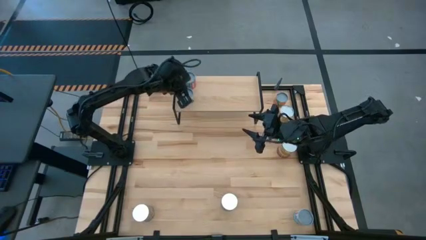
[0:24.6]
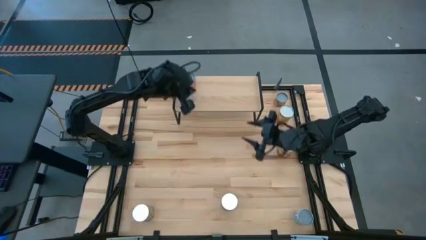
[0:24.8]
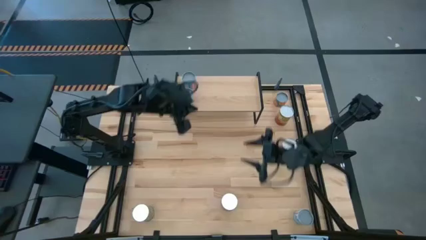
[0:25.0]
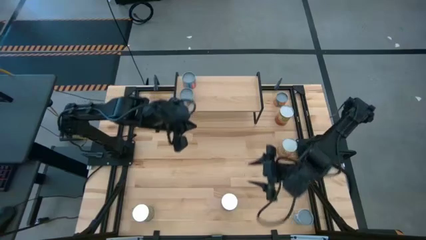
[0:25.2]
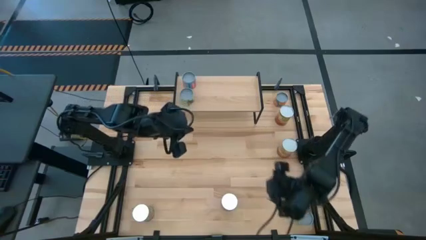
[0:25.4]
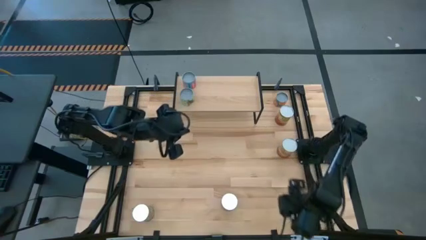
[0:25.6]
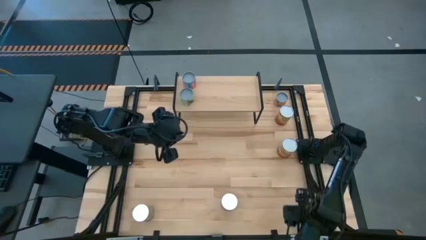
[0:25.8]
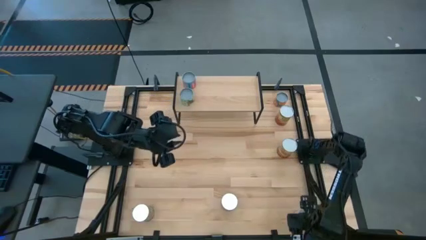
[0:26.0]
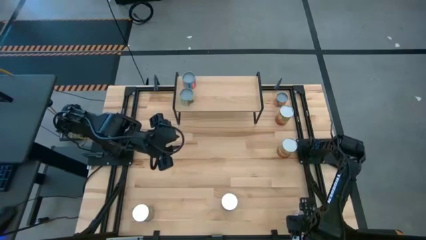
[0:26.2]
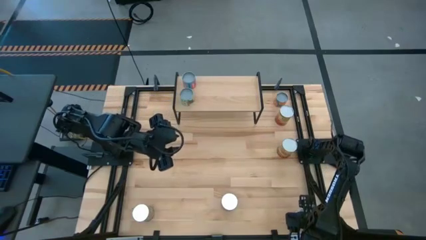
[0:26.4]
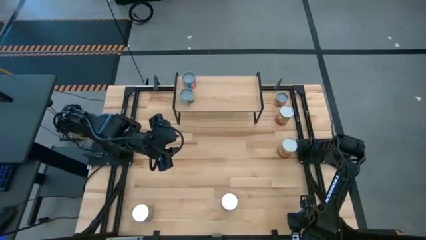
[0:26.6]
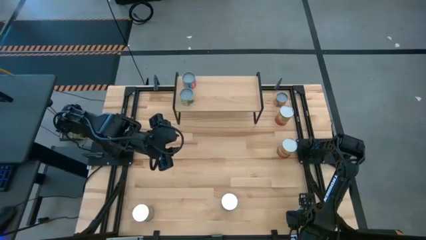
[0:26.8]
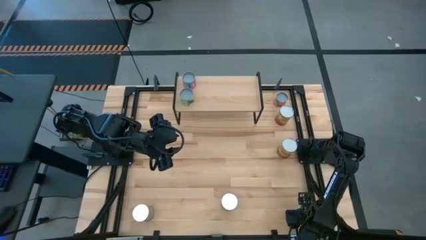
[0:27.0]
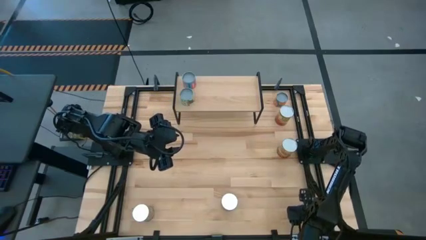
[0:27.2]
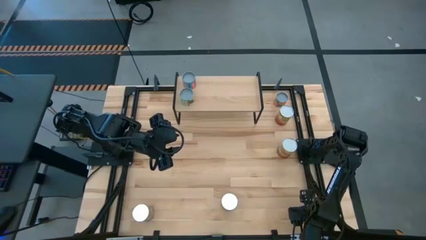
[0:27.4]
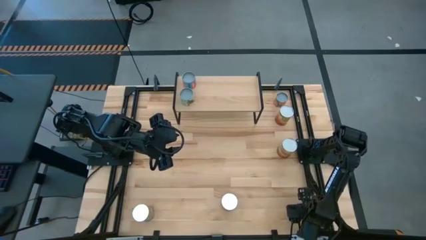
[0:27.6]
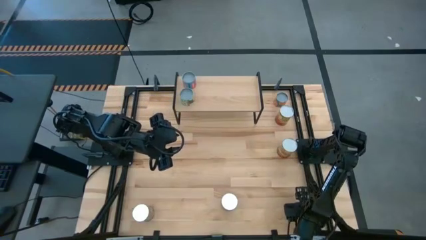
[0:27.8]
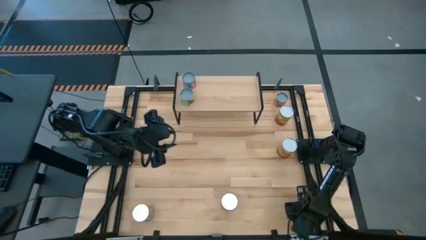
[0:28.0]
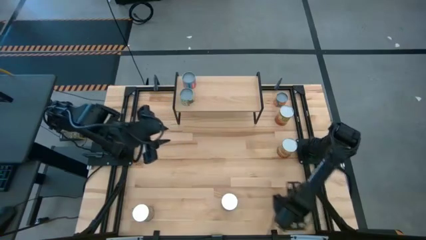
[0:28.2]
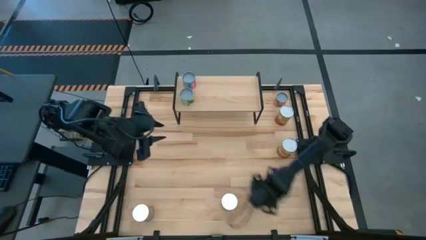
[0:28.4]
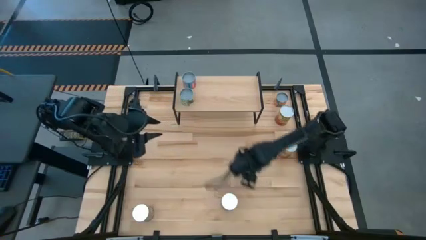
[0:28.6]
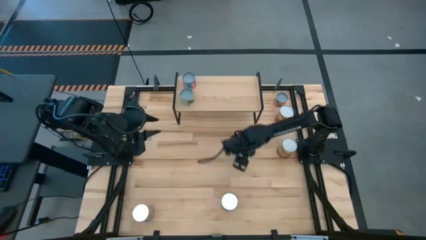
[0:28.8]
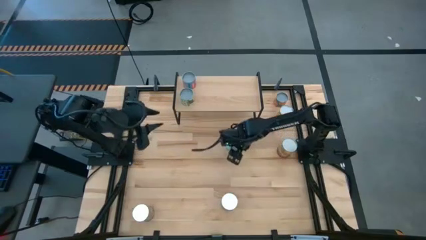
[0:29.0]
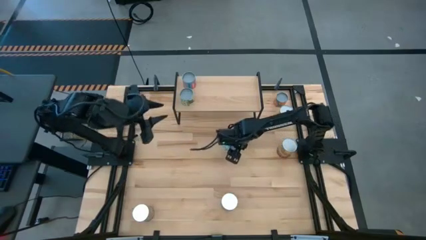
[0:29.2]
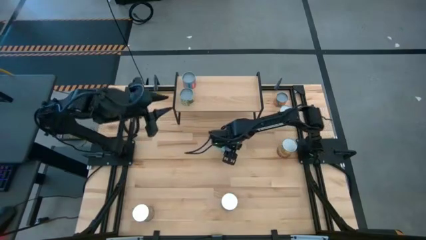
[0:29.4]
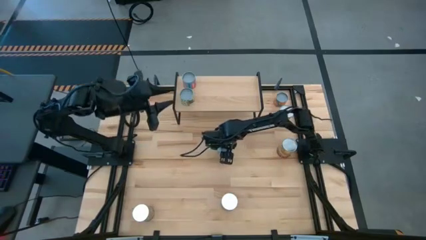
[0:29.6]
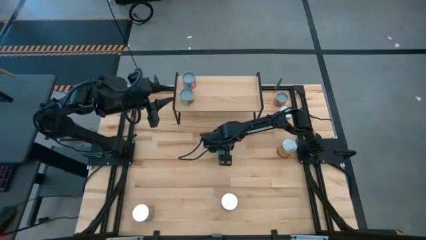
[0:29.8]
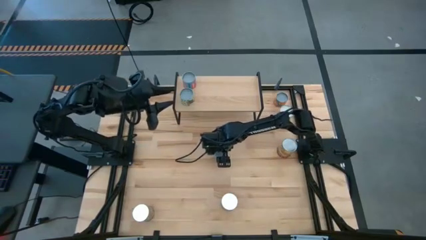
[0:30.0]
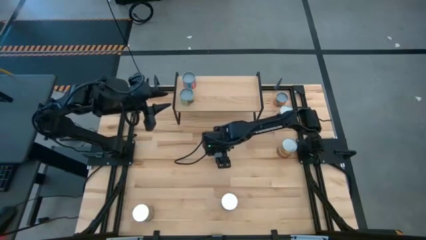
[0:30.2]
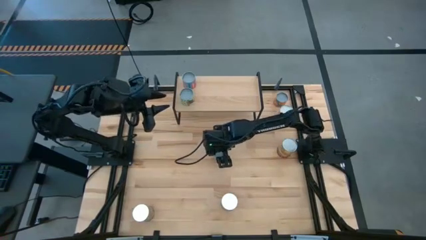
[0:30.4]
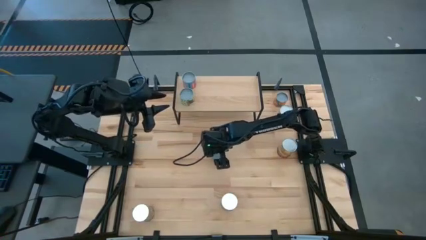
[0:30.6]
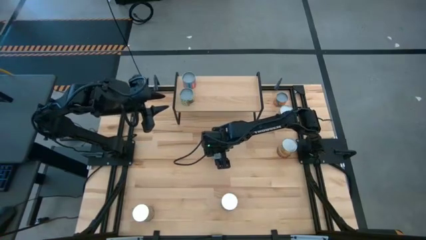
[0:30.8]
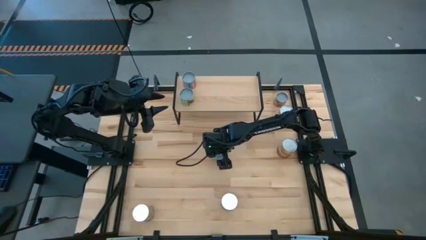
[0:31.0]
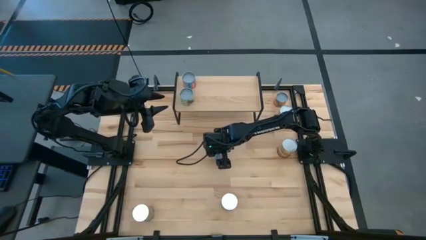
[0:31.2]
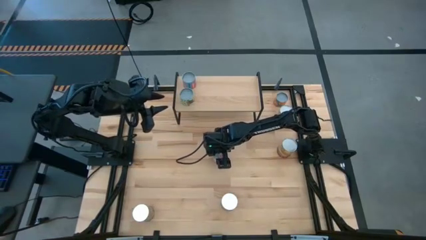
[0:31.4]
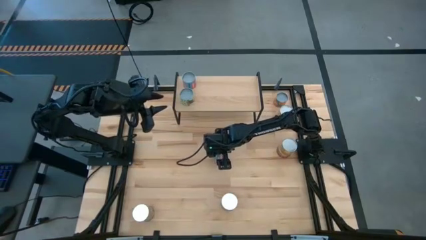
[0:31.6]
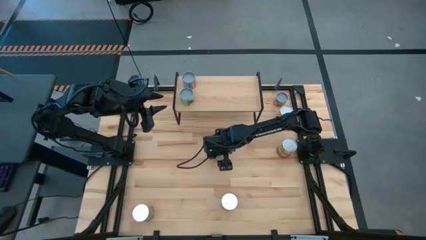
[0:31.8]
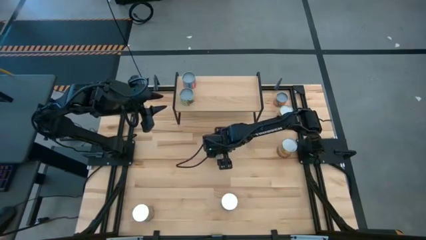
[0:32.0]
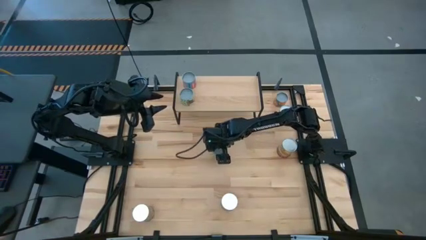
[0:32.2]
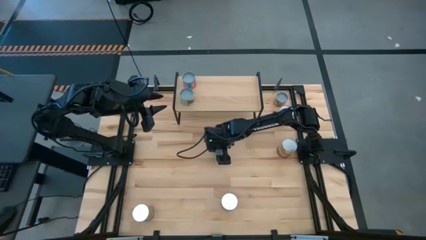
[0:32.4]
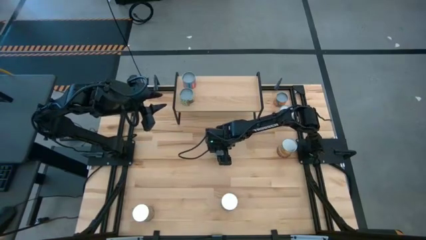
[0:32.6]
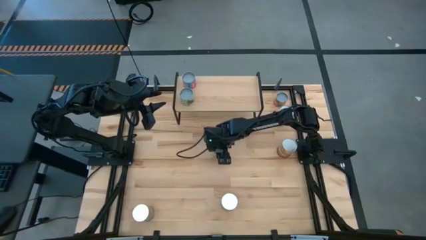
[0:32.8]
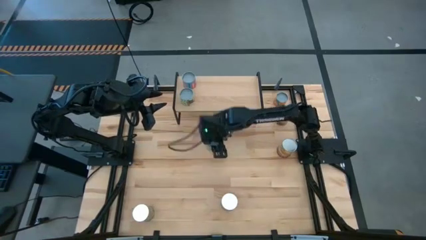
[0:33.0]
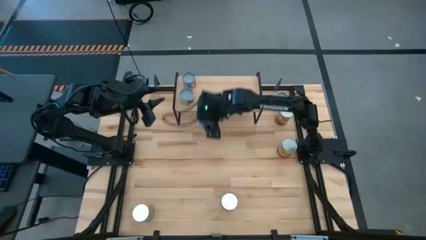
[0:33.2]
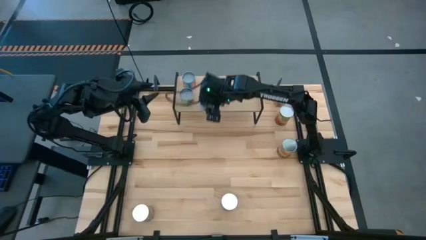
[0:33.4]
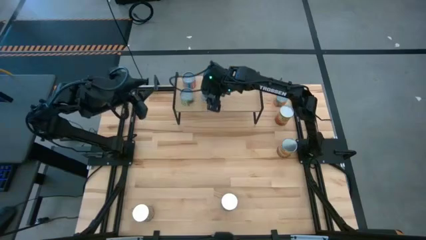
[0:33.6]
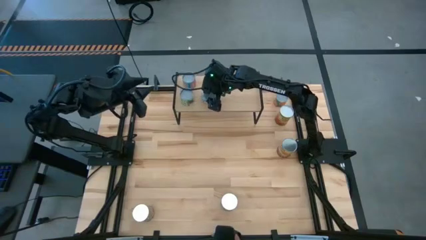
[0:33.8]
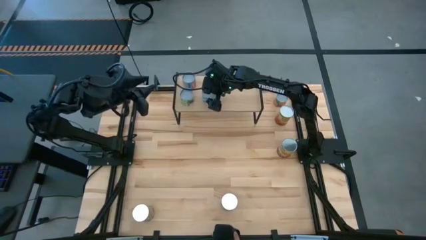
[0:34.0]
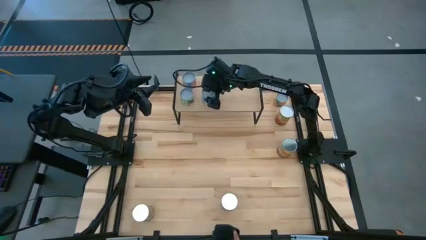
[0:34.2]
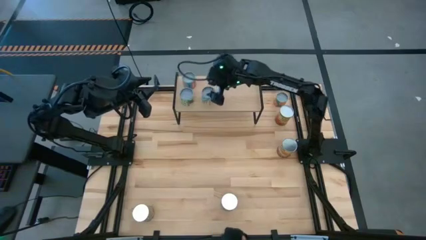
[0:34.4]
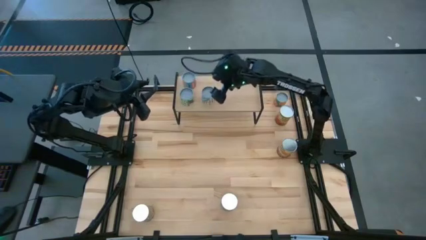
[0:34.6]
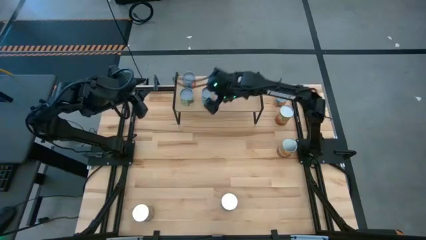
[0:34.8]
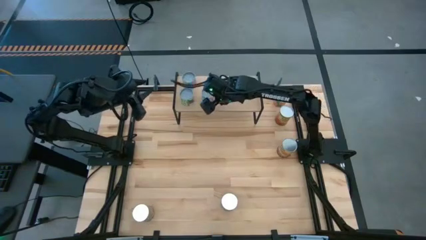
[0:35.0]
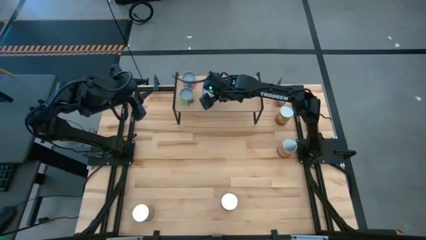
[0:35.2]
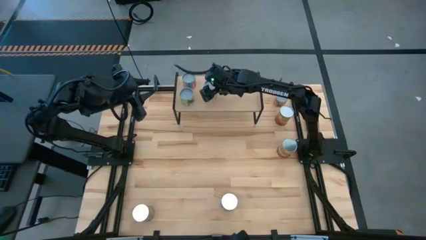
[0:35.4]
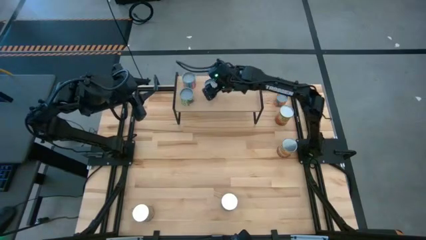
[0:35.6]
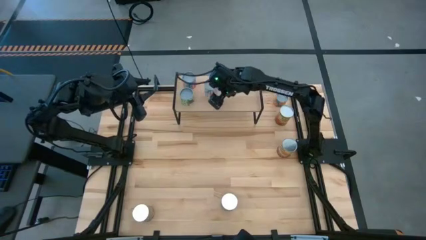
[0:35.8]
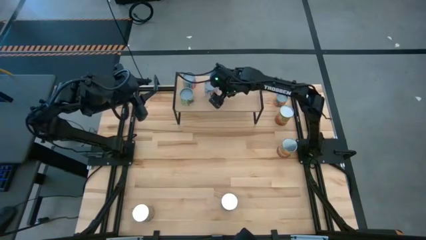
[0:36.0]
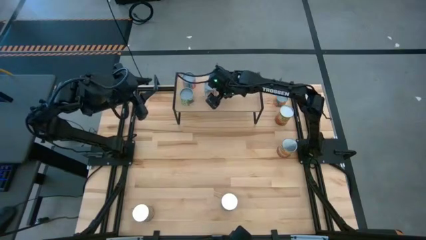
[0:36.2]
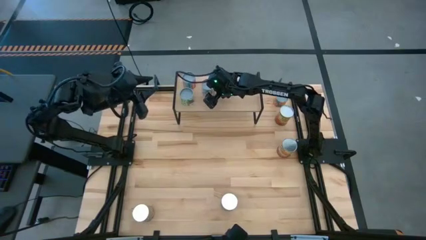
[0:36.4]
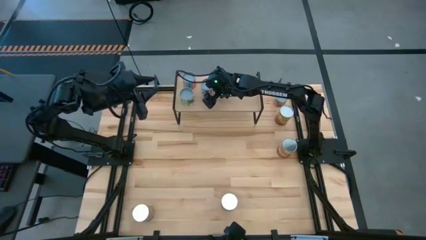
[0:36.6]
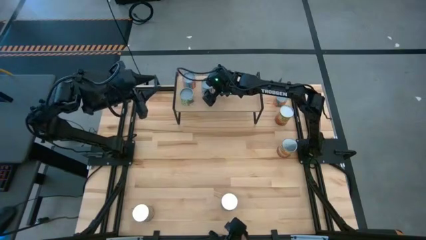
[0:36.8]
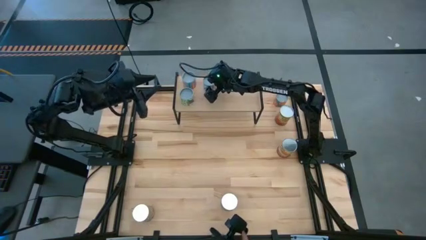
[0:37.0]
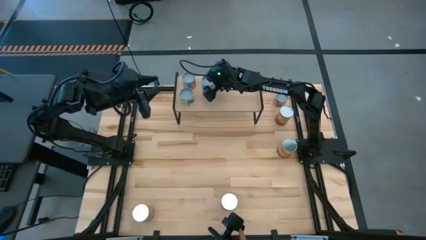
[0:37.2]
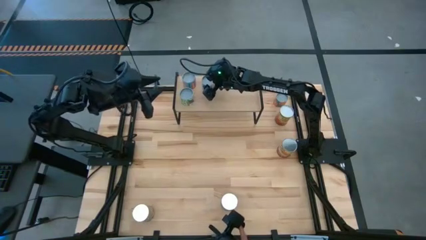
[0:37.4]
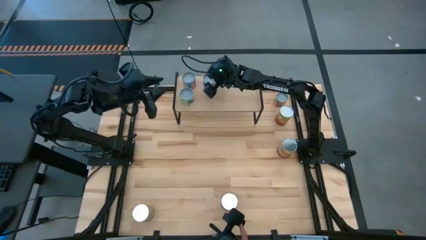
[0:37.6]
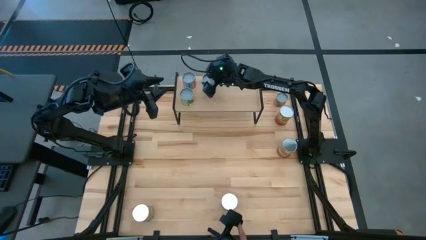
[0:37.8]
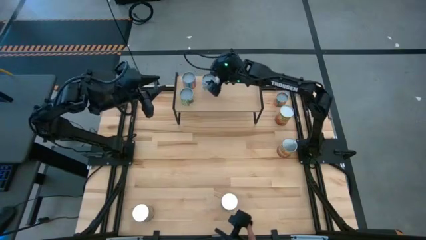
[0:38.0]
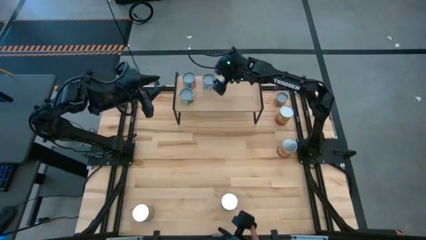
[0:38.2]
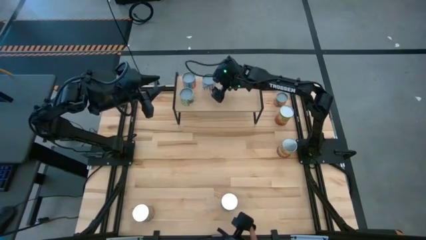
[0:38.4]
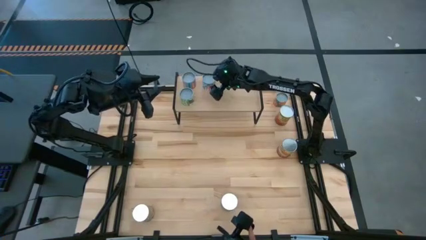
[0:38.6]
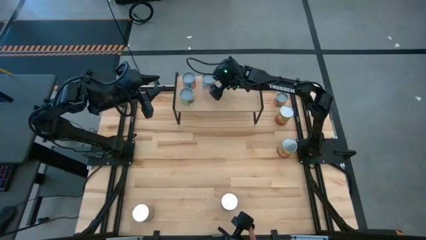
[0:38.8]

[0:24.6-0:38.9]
Task: Pick and place cans onto a shelf
Put the can of carrots on the shelf

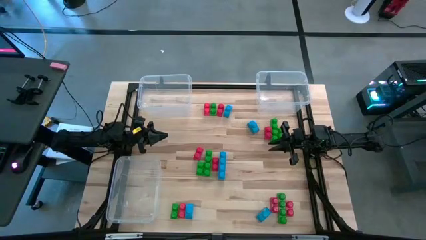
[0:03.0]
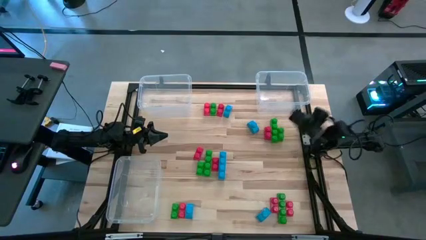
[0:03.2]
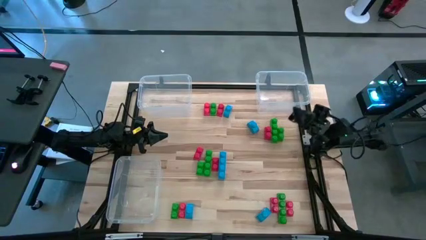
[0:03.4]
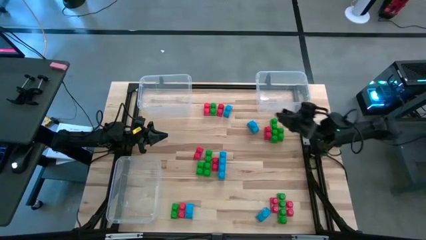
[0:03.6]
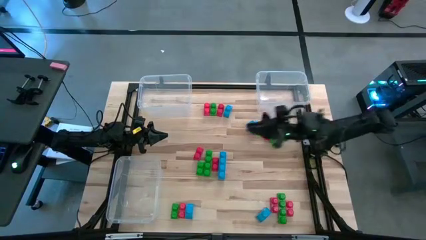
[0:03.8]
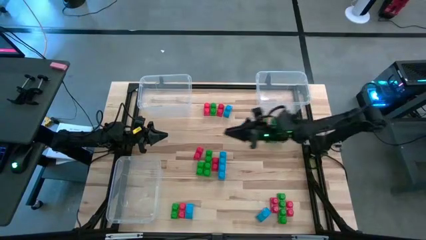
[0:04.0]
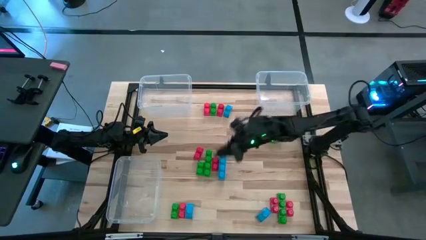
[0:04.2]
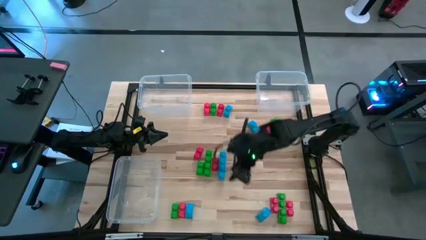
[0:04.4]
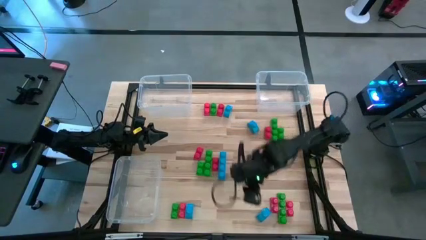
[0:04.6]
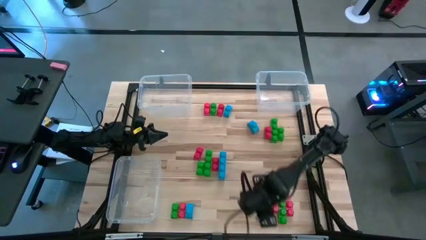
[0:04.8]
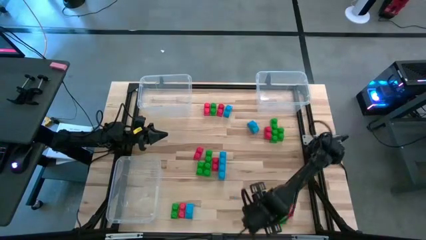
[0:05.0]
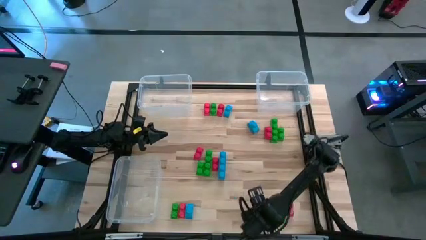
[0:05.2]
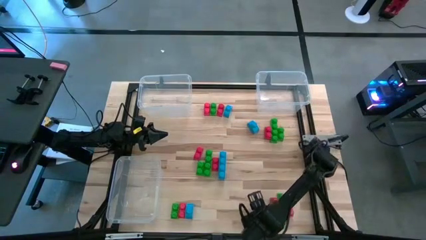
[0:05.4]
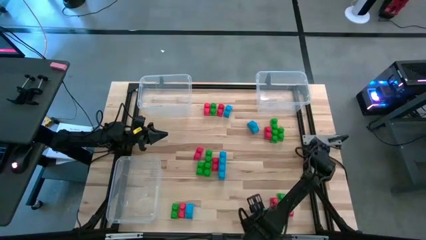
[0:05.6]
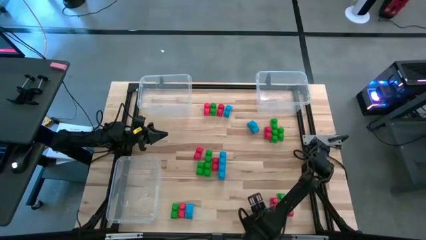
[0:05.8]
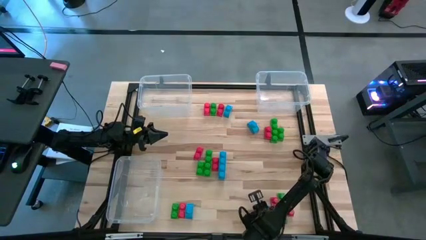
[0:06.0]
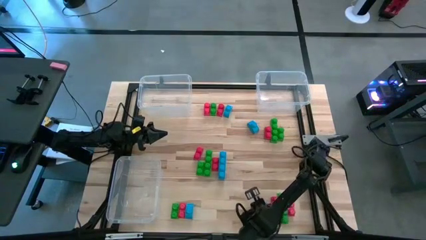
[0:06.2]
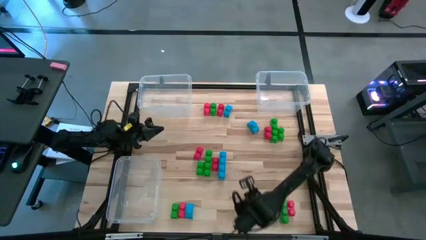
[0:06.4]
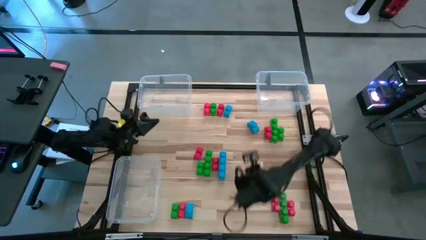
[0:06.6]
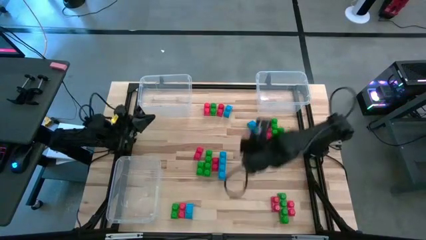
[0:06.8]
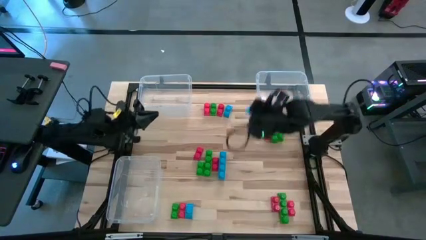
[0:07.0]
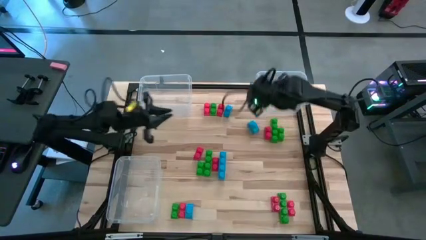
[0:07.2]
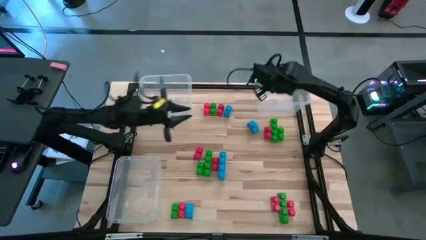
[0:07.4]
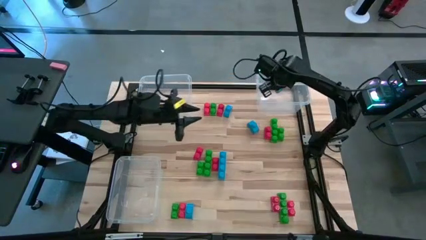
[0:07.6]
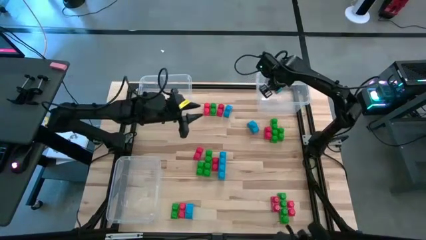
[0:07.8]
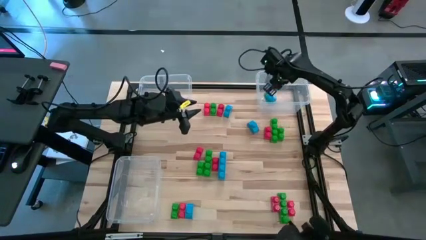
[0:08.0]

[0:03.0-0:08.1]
Task: Sort blocks
Put the blue game piece into the top right transparent bin
